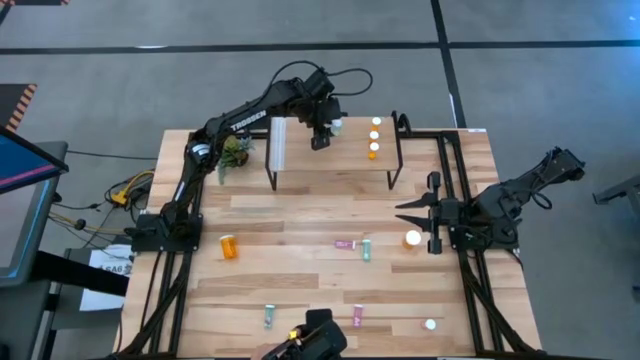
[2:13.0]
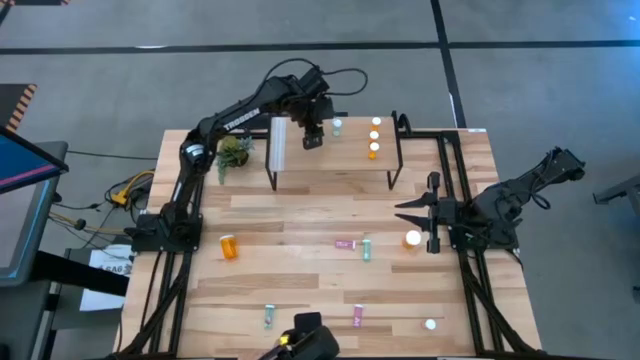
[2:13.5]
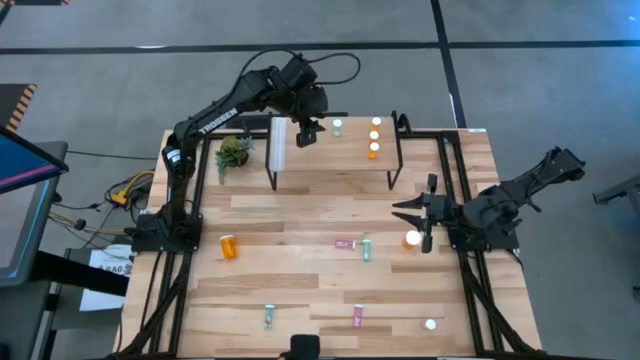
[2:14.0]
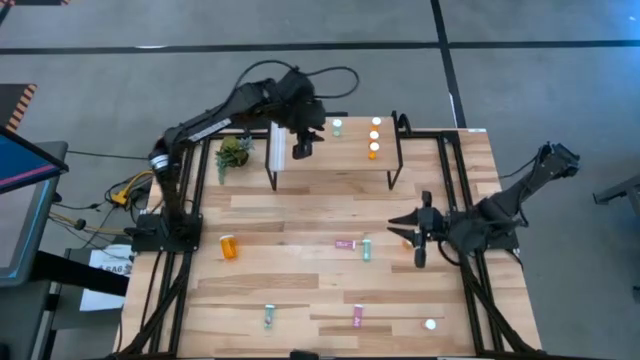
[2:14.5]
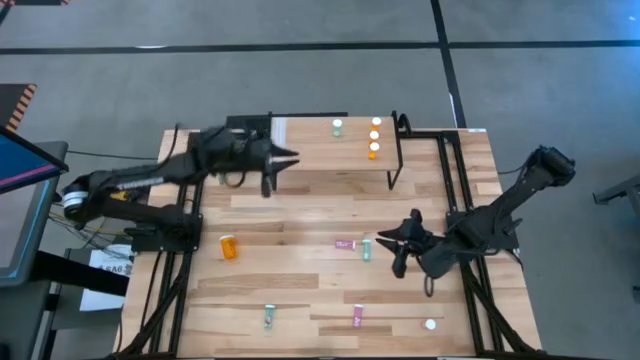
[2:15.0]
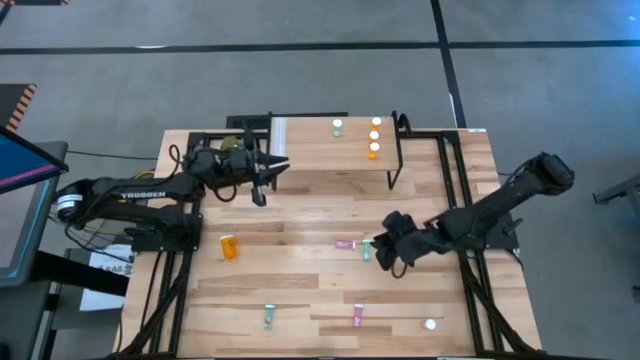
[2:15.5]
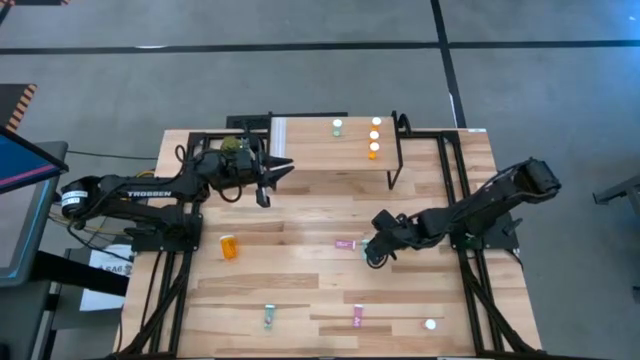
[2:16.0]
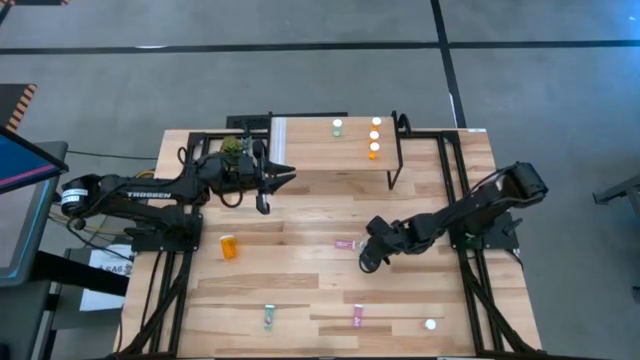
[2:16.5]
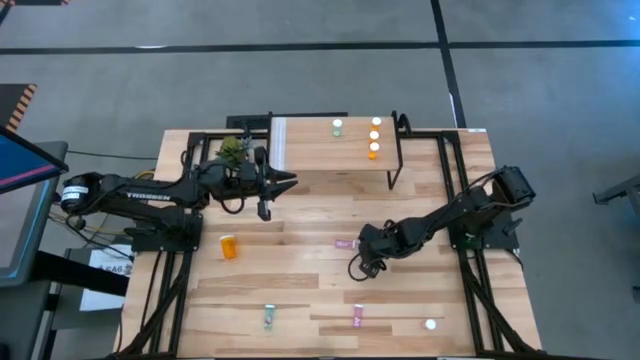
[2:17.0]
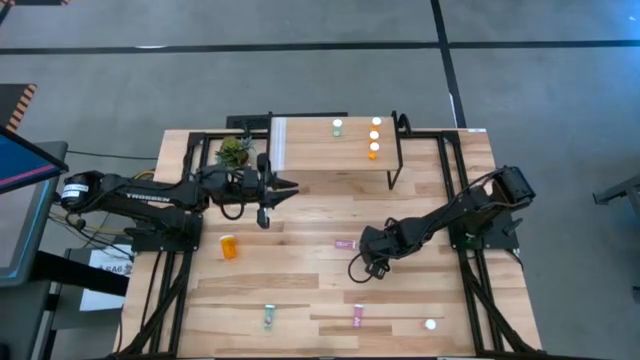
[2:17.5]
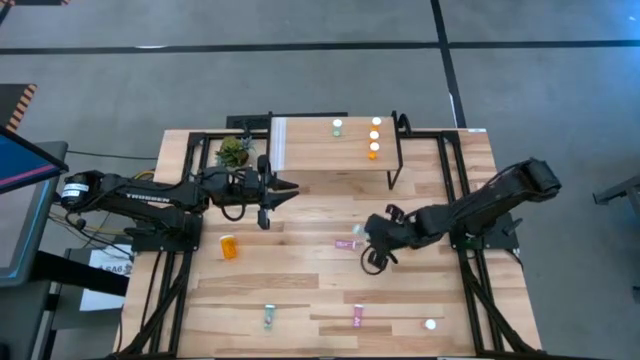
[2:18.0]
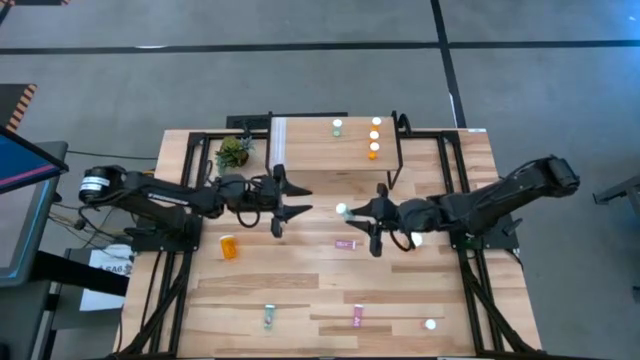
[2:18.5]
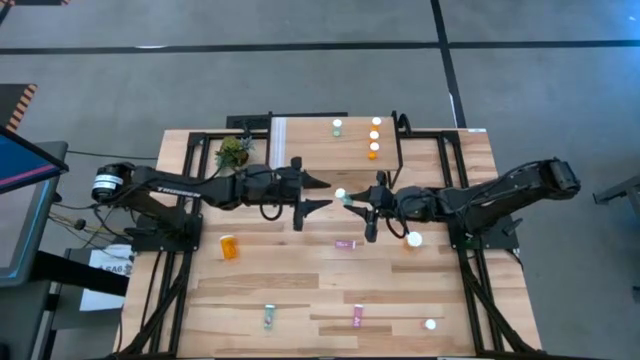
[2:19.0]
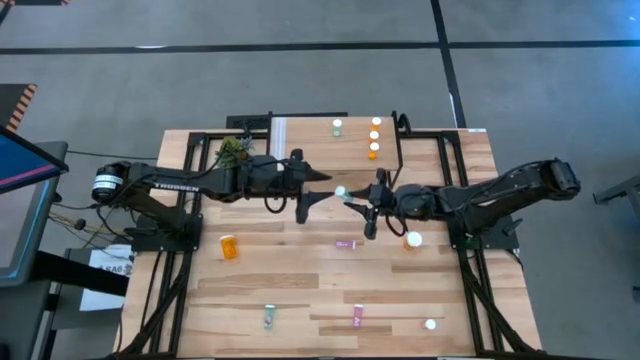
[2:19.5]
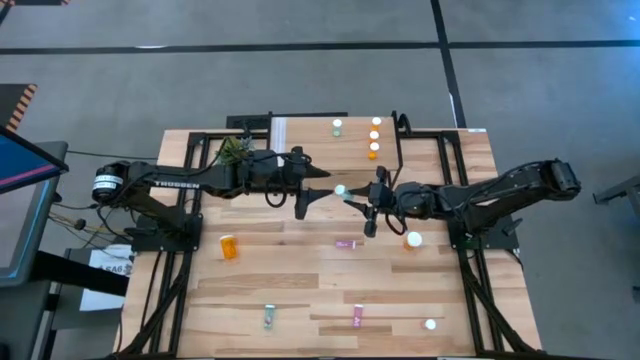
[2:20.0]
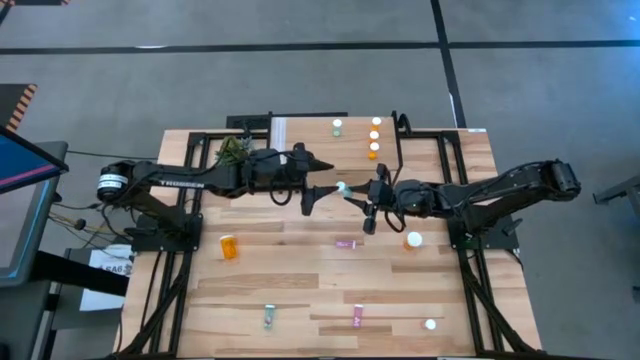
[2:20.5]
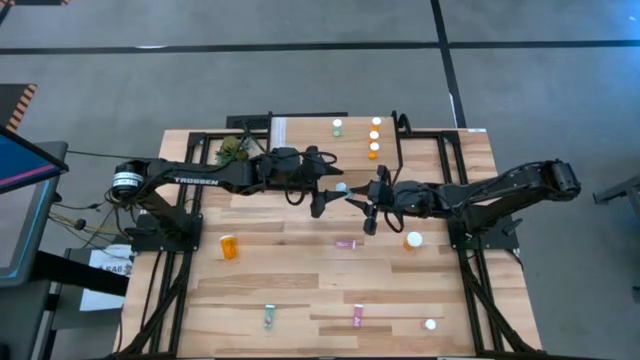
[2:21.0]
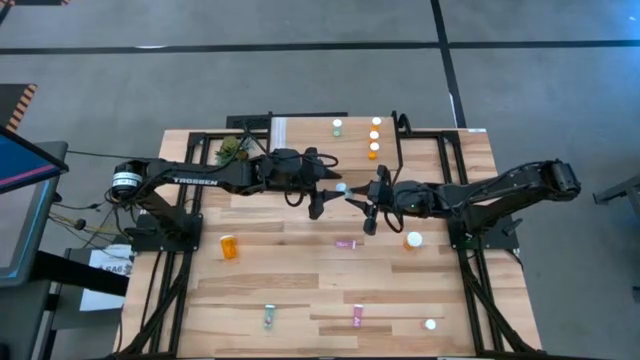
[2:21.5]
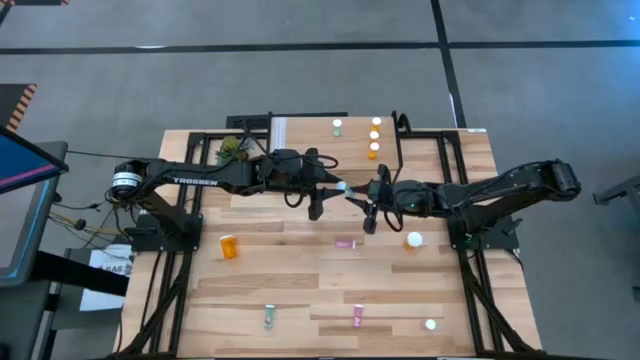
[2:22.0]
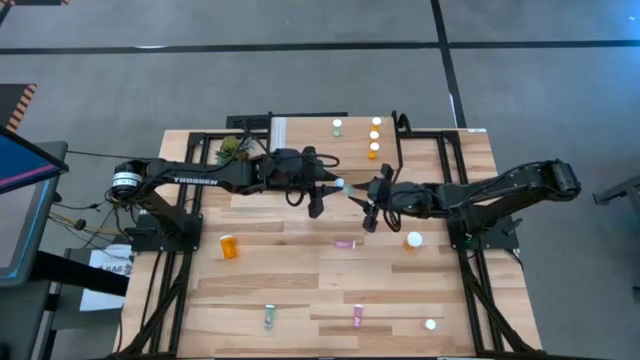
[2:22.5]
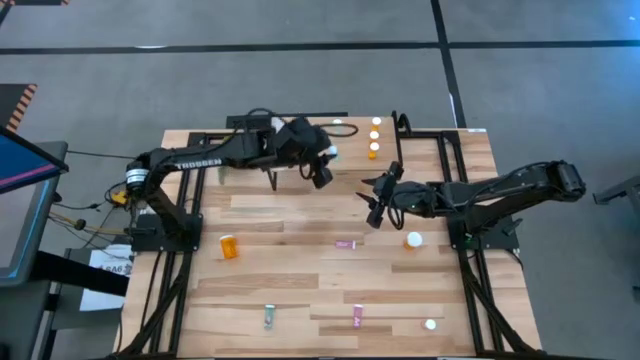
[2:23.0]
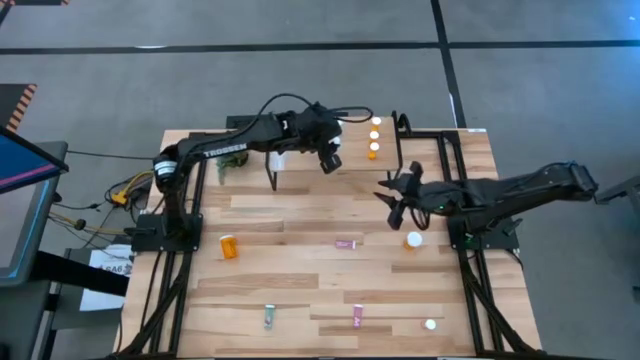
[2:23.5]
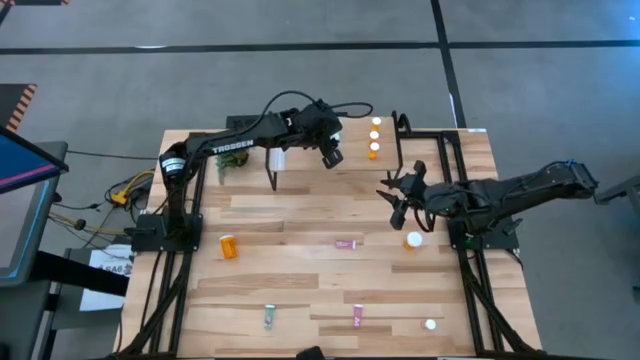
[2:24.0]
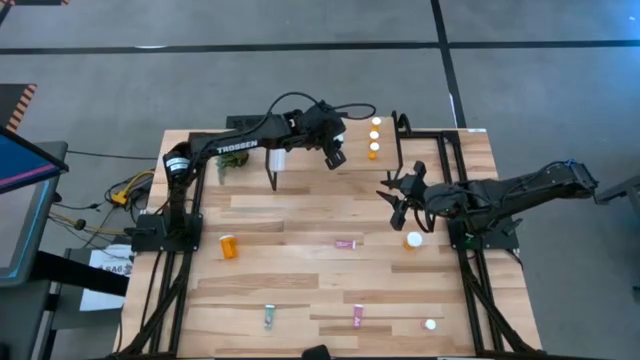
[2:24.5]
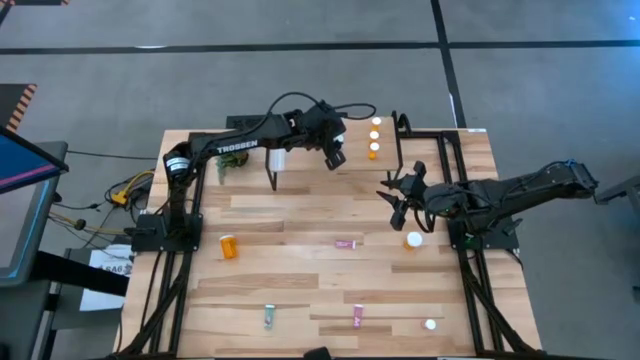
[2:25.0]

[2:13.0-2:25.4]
Task: Pick and place medicine bottles onto shelf by color
Put the top blue pill bottle on the shelf aligned with the other blue pill bottle

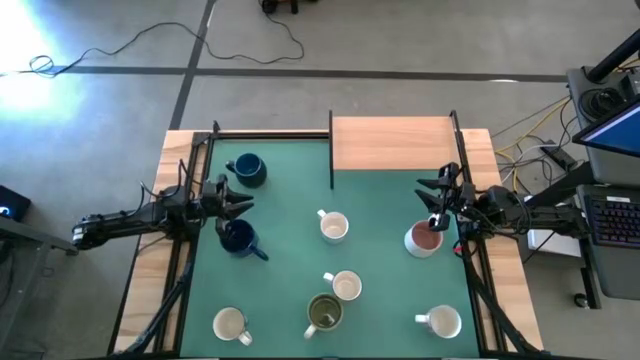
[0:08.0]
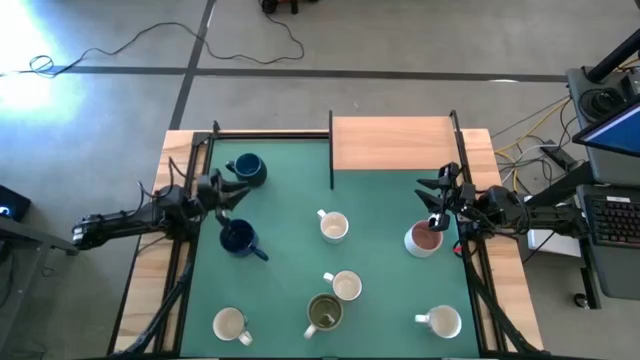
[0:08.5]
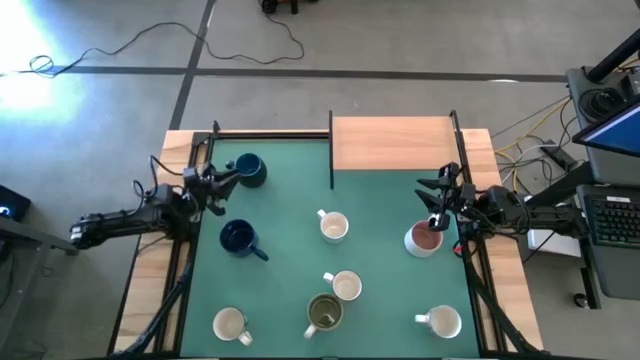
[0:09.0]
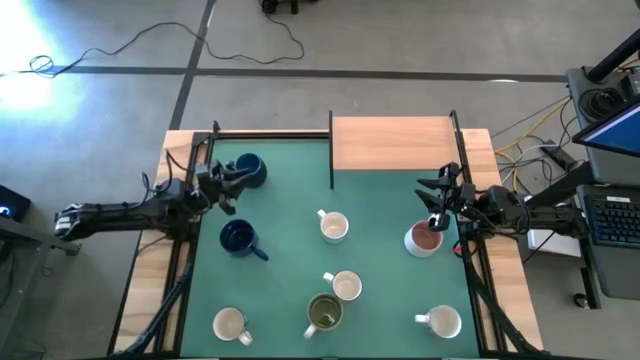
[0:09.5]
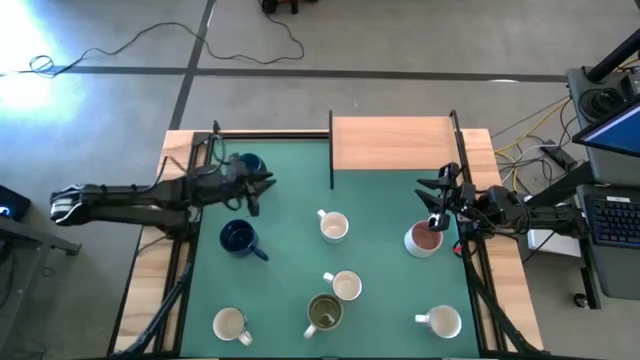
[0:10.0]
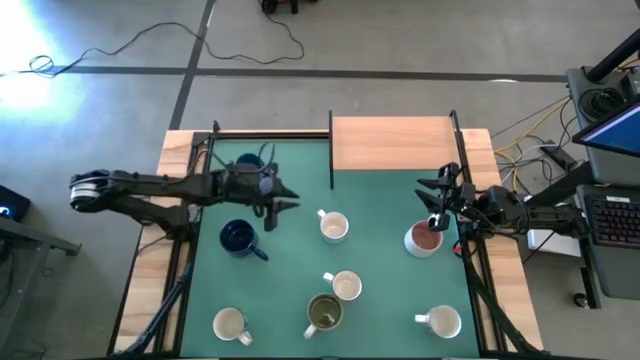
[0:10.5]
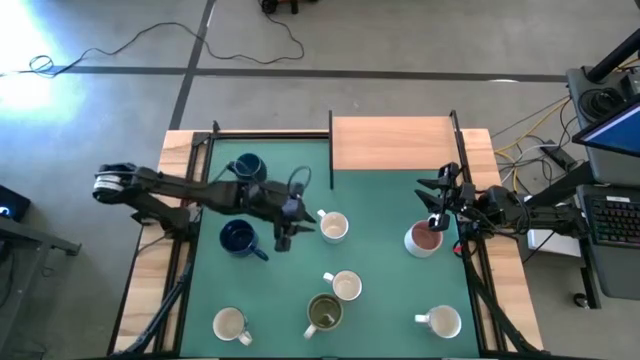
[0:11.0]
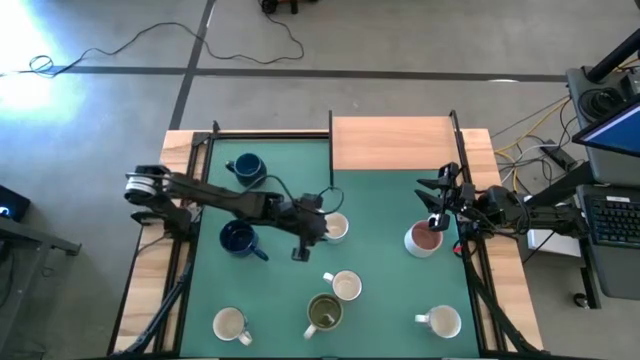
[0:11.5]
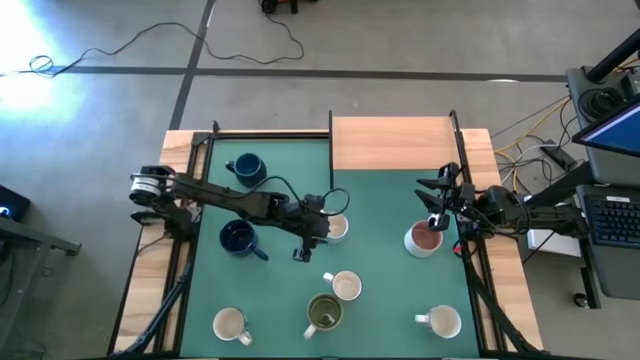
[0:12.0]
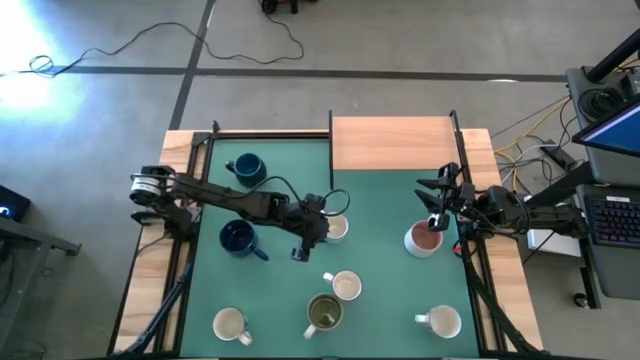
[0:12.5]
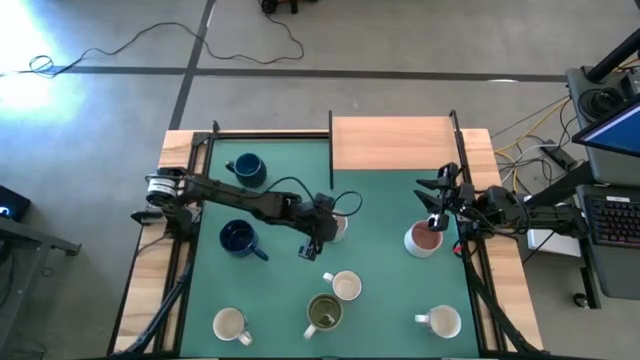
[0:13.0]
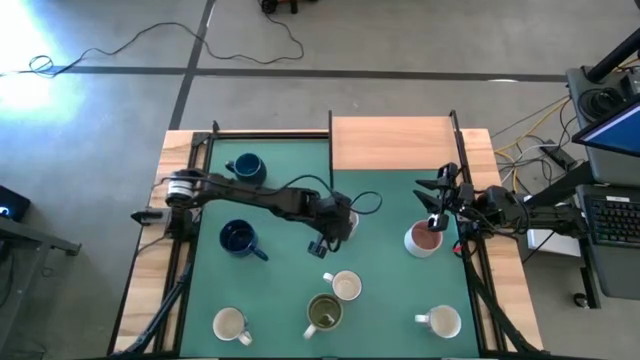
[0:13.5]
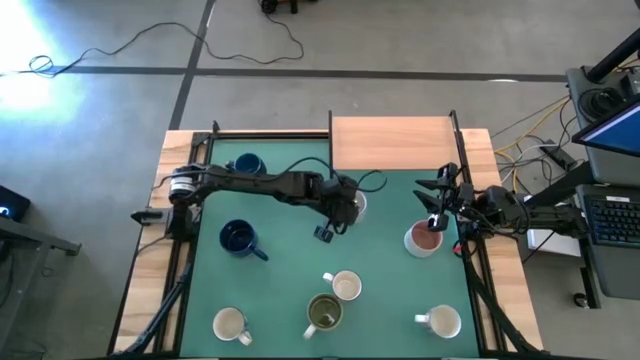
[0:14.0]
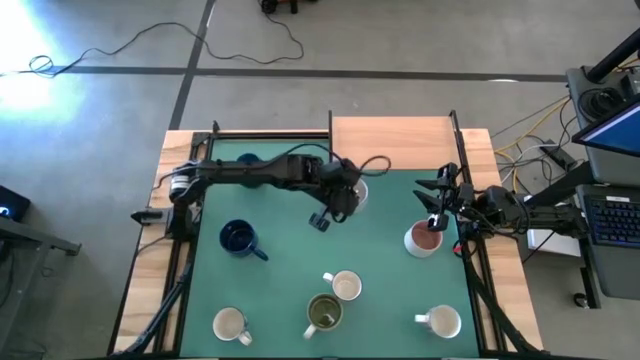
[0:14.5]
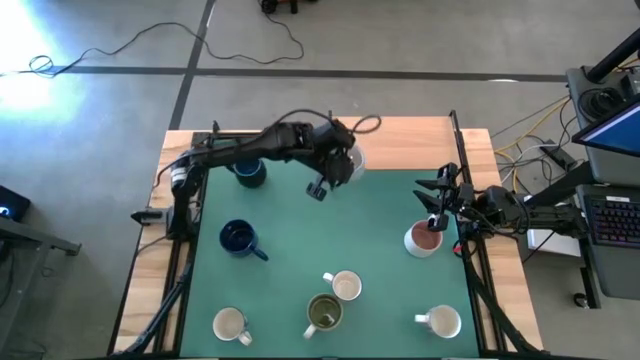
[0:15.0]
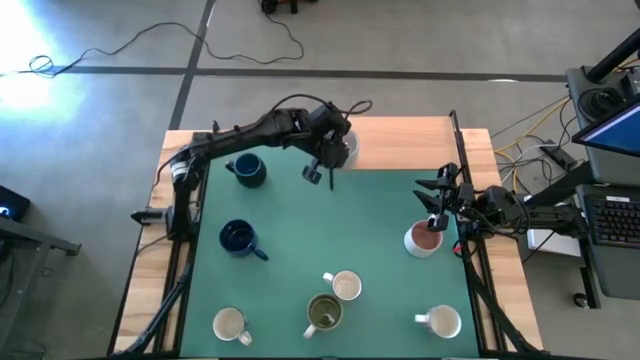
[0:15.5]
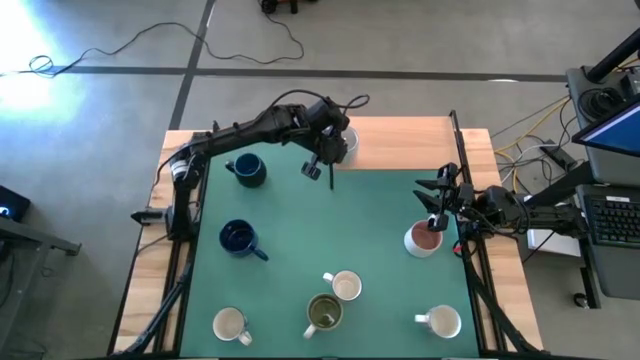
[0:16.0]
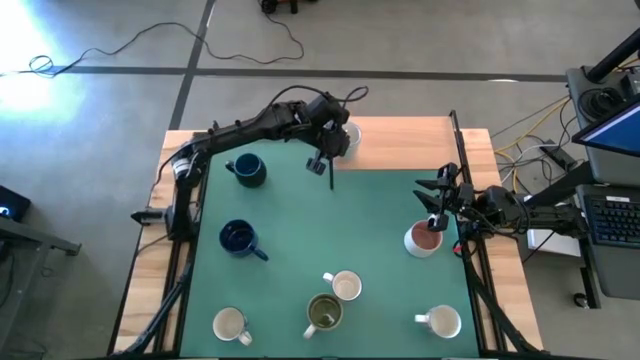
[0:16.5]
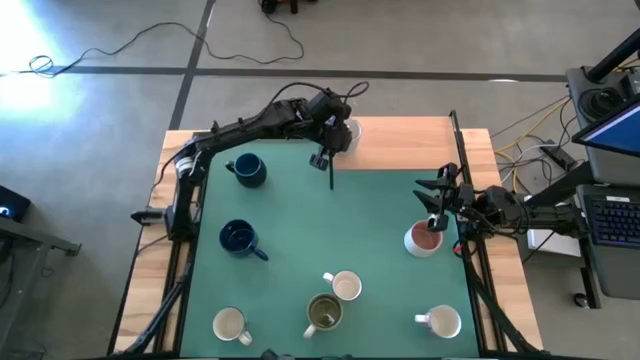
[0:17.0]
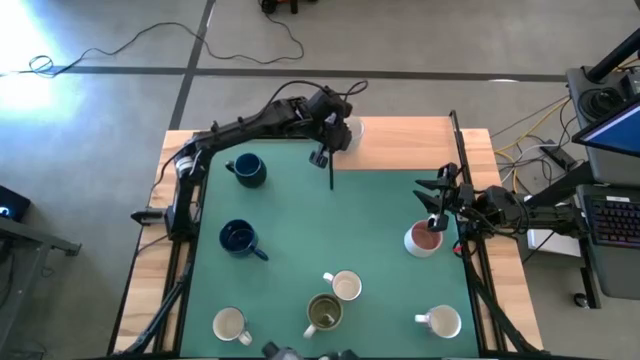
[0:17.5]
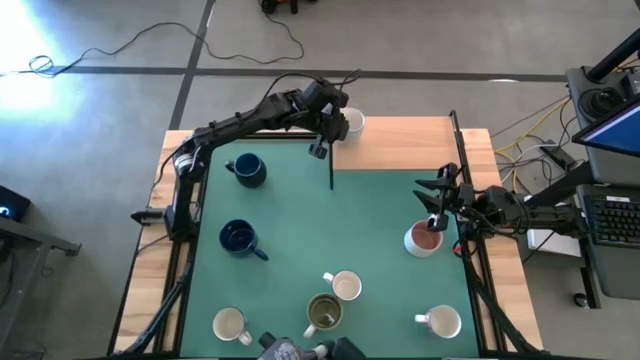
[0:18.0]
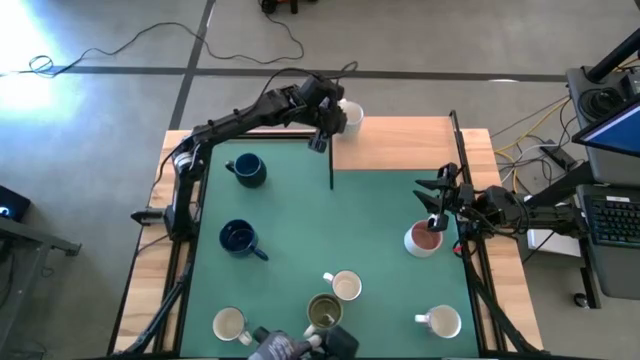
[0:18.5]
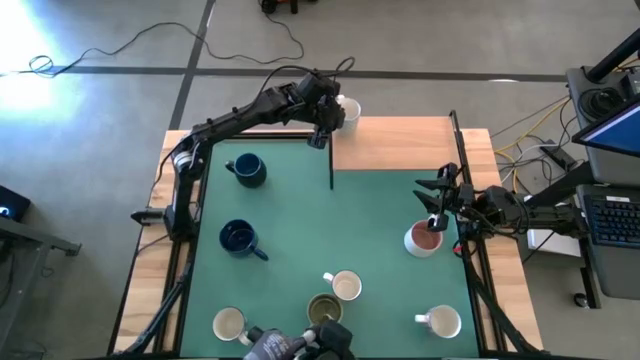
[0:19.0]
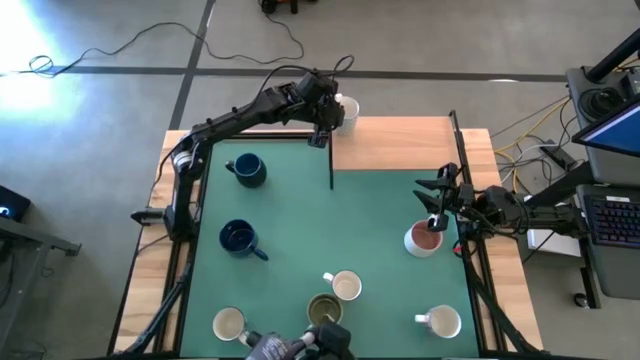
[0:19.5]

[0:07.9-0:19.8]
Task: Place coffee mugs
Put the light blue patterned mug on the shelf
